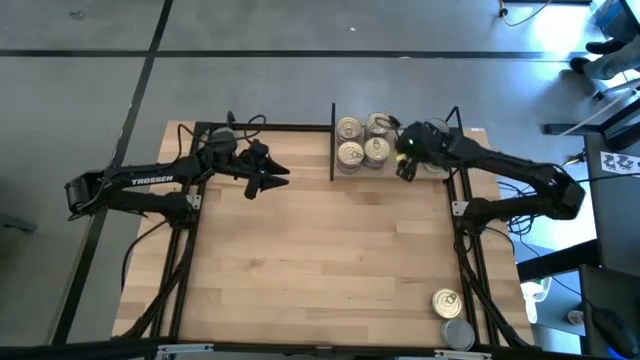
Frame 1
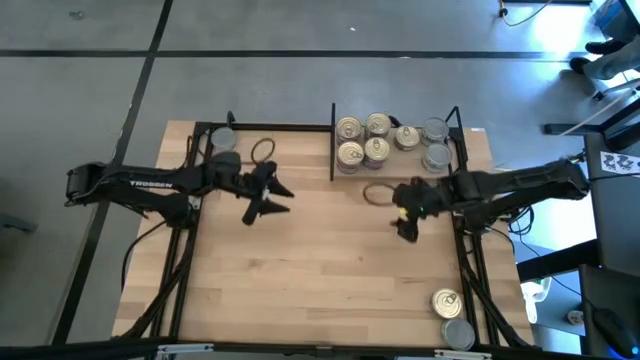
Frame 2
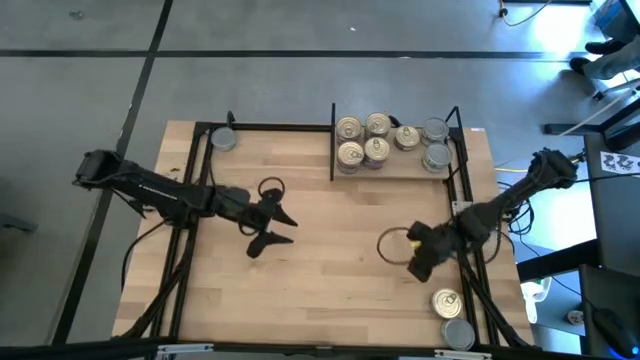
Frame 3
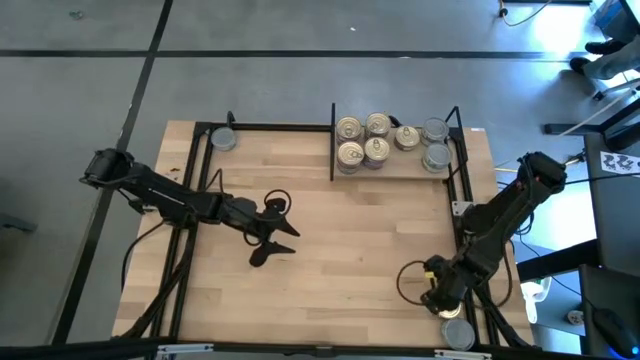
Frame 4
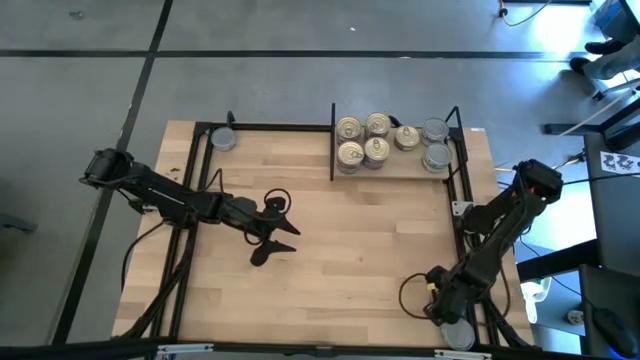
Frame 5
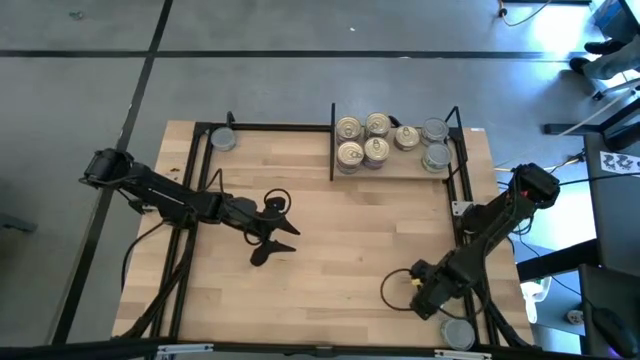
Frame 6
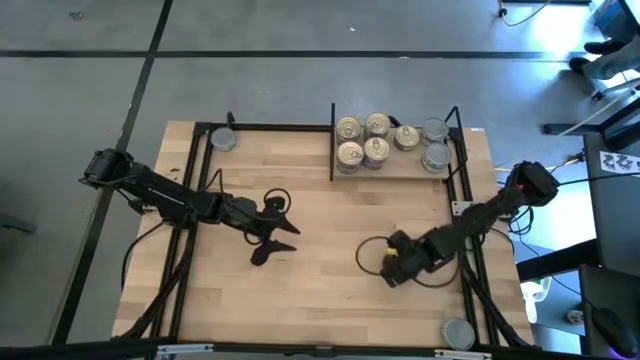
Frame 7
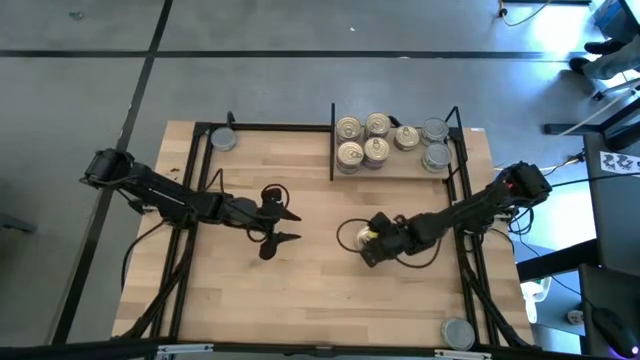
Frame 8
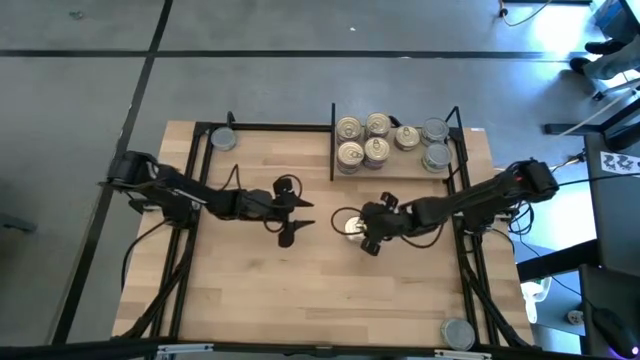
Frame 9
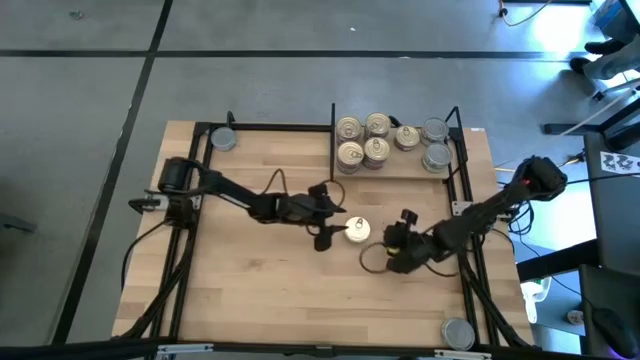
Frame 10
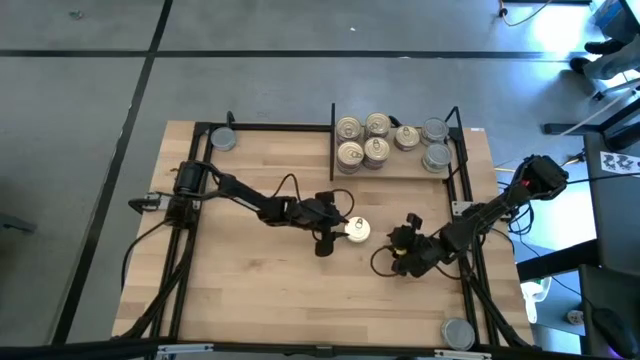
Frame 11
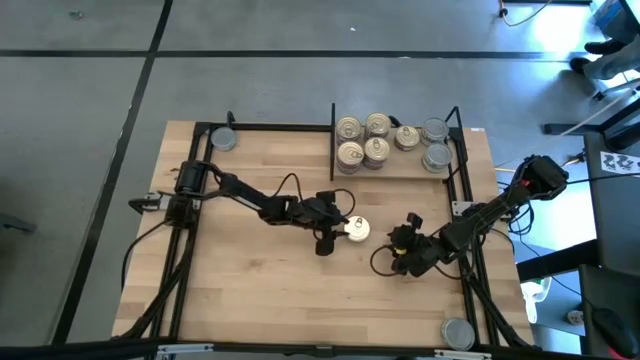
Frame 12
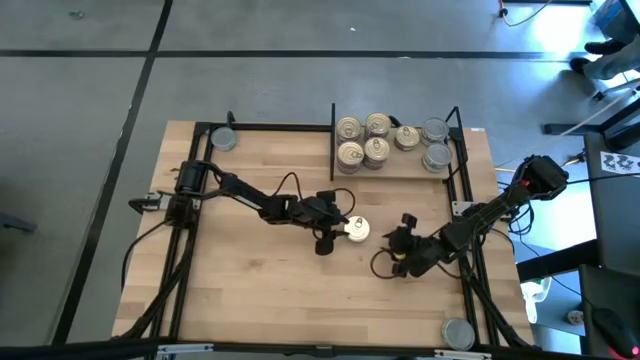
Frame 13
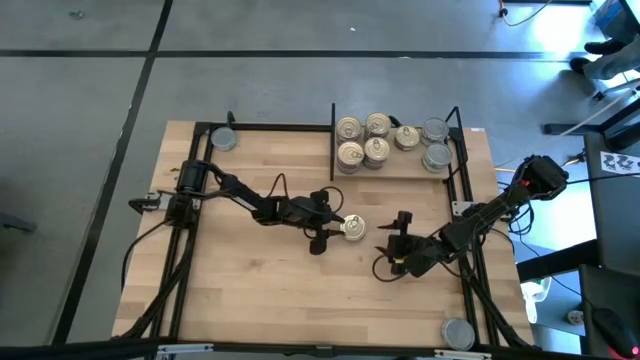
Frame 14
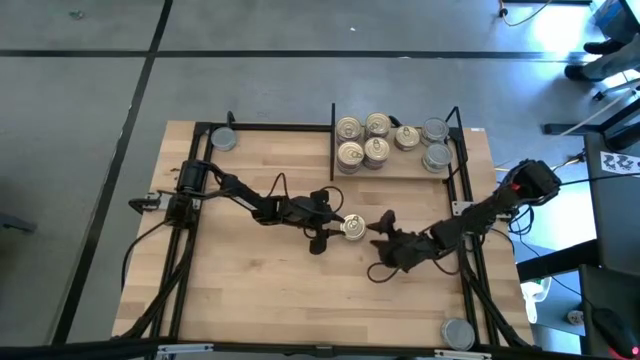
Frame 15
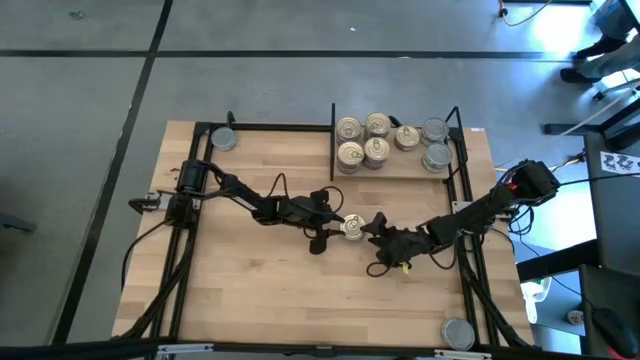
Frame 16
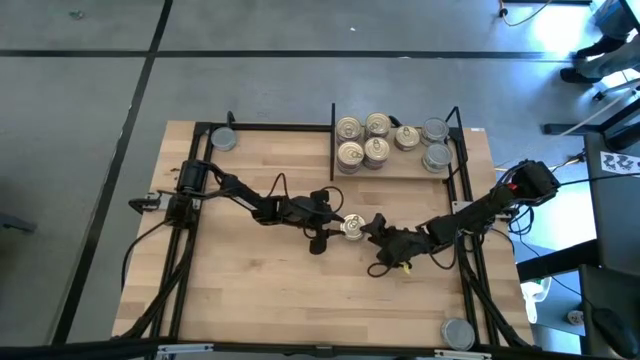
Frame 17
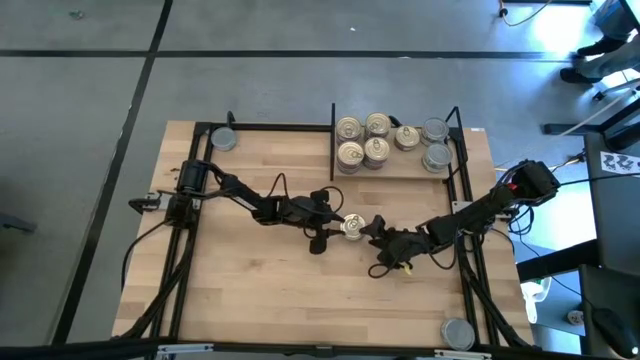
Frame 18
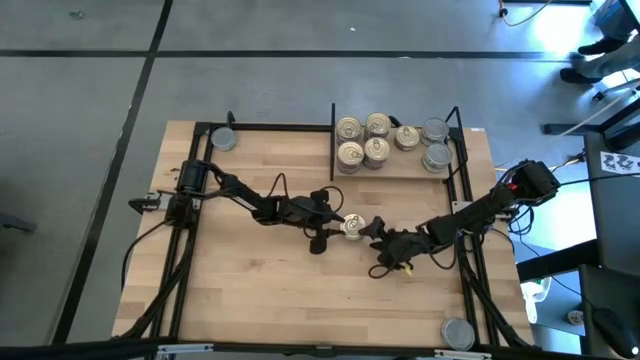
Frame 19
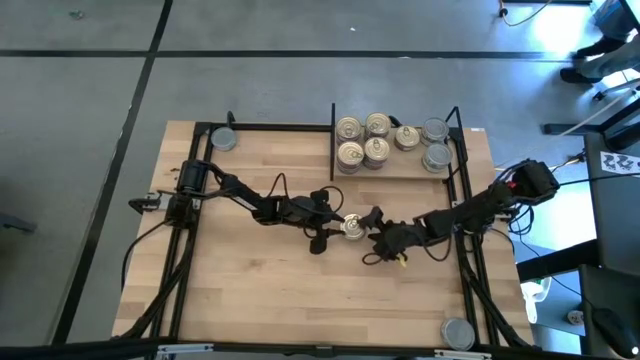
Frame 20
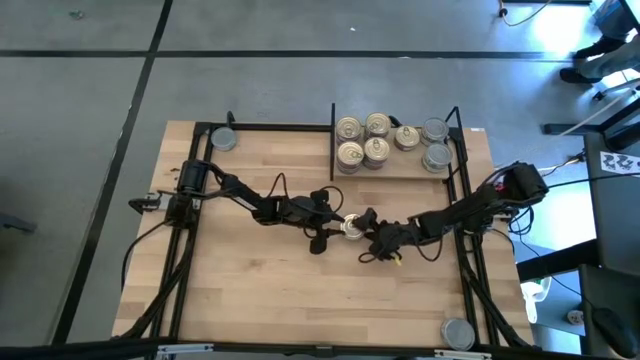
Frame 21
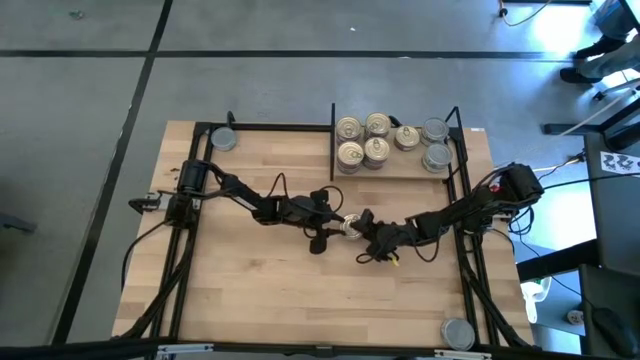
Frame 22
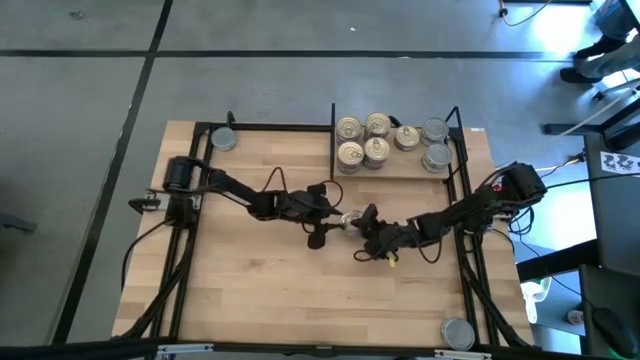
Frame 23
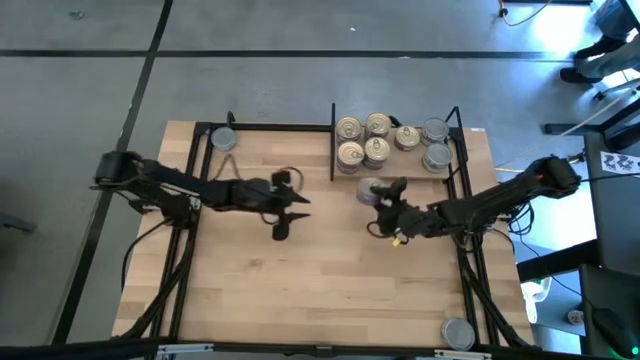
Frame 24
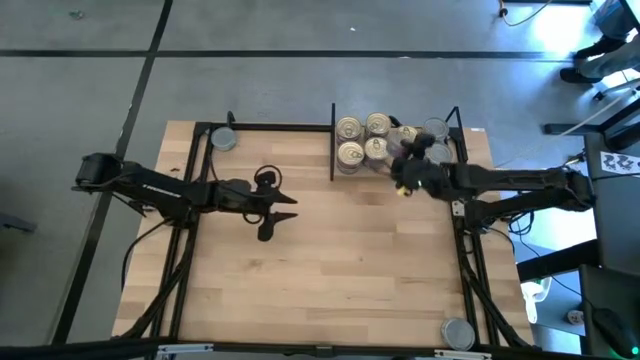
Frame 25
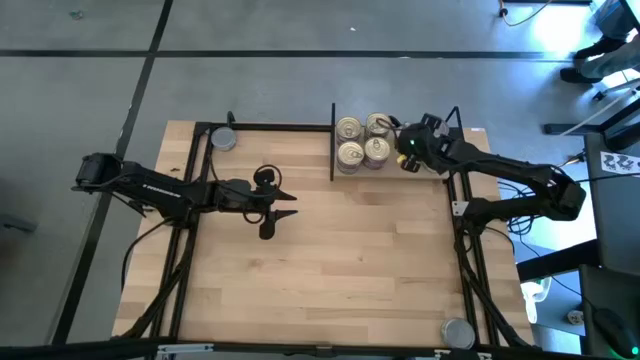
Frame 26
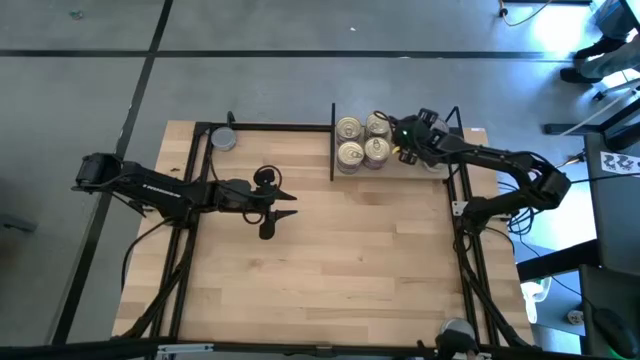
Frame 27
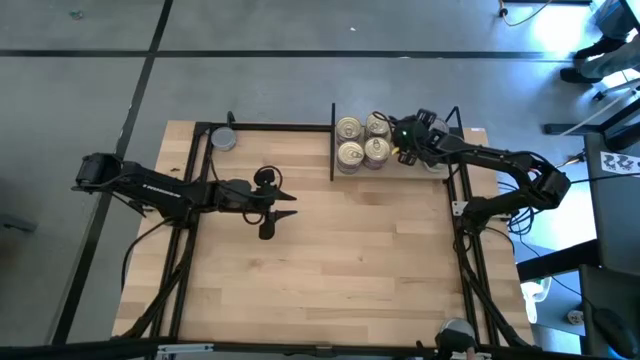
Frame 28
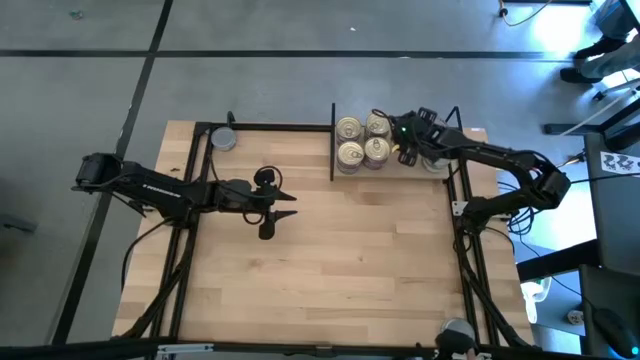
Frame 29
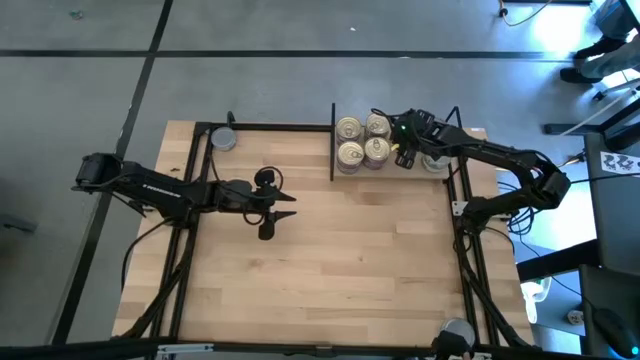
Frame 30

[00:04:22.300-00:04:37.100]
Task: Stack canned seafood by type on shelf
Stack the blue tuna can on top of the blue tuna can

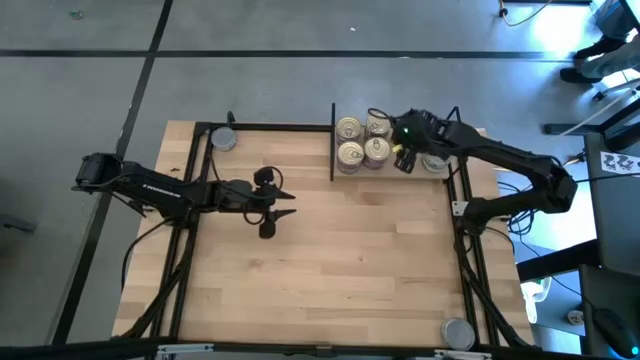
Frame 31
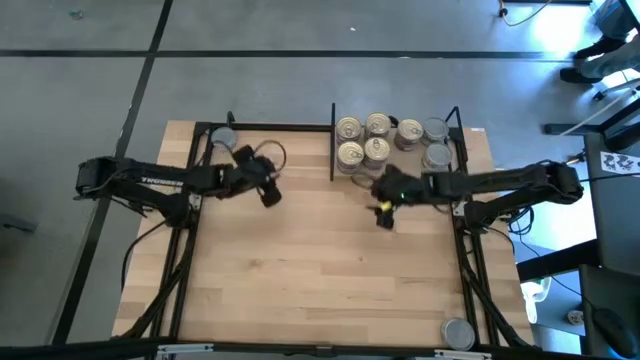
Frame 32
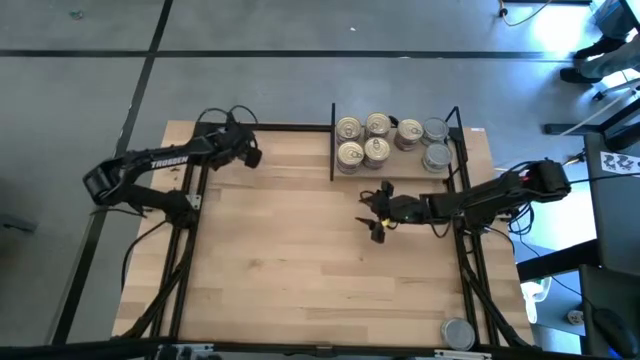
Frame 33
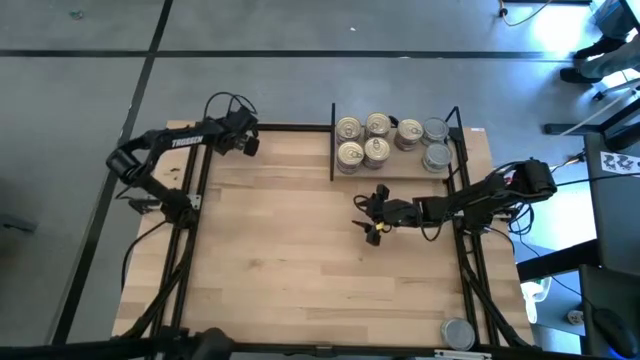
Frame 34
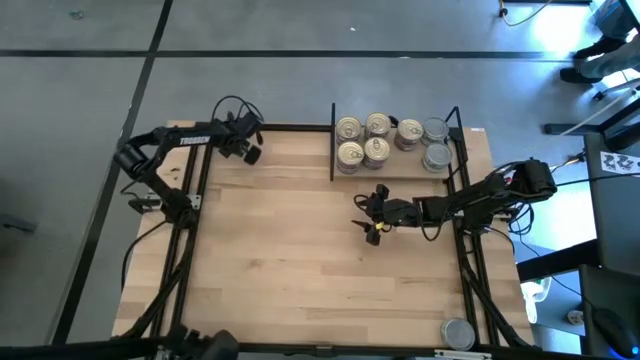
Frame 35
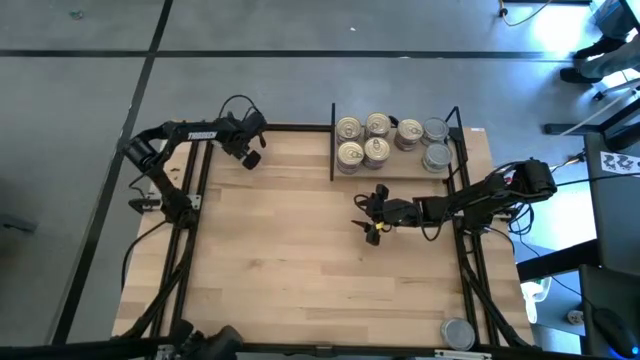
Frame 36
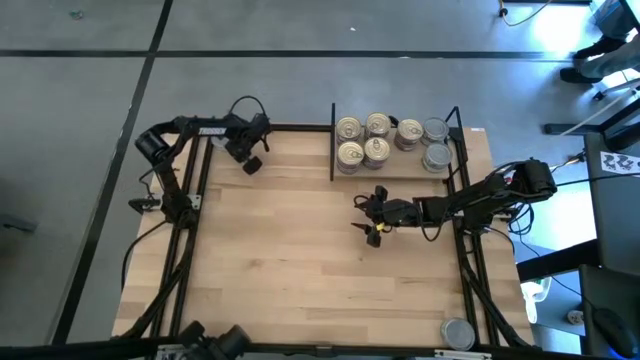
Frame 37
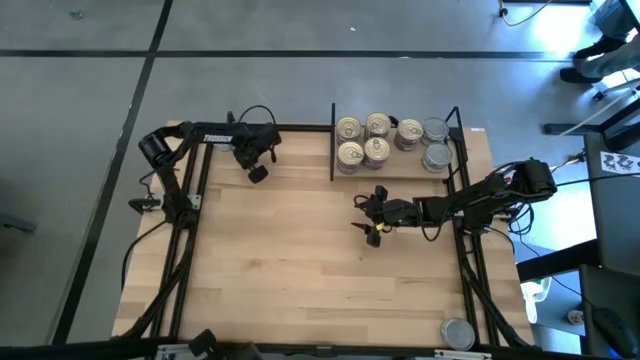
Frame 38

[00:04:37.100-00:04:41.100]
Put the green tuna can on the shelf

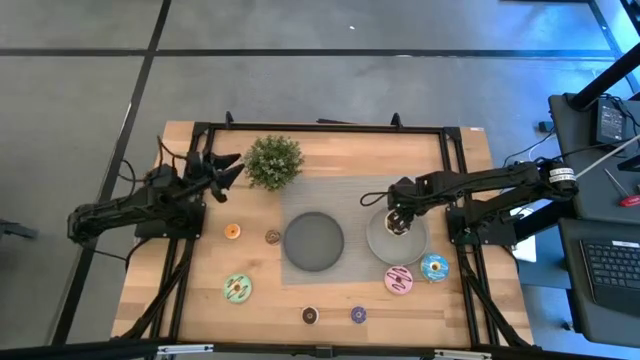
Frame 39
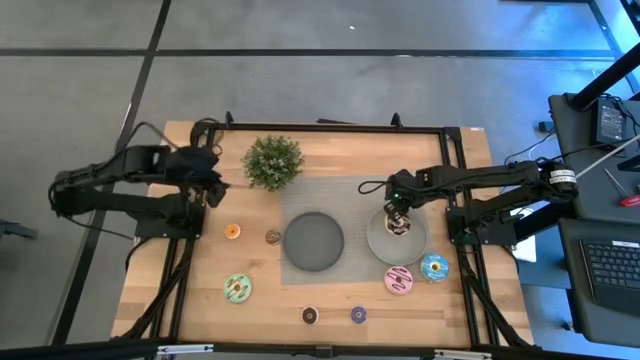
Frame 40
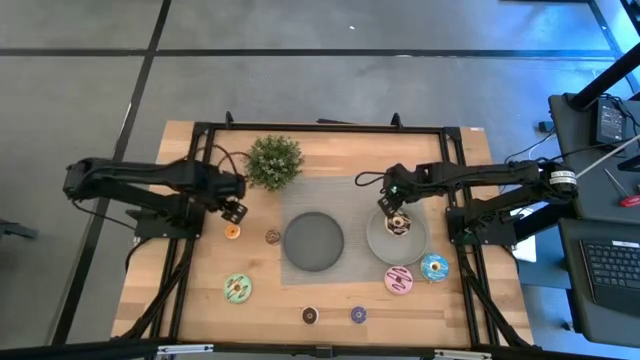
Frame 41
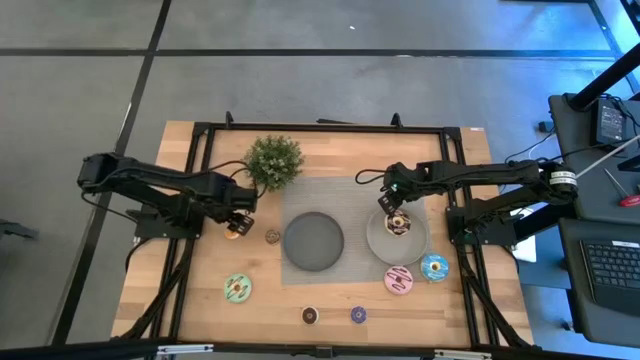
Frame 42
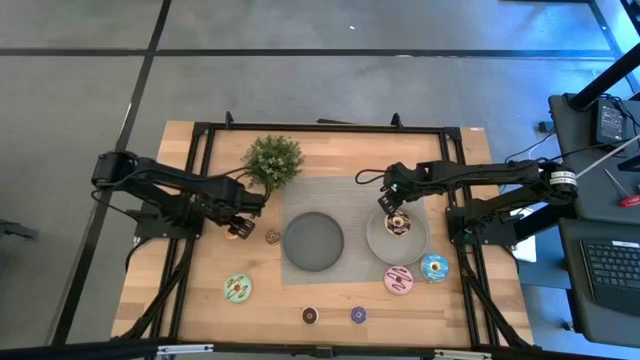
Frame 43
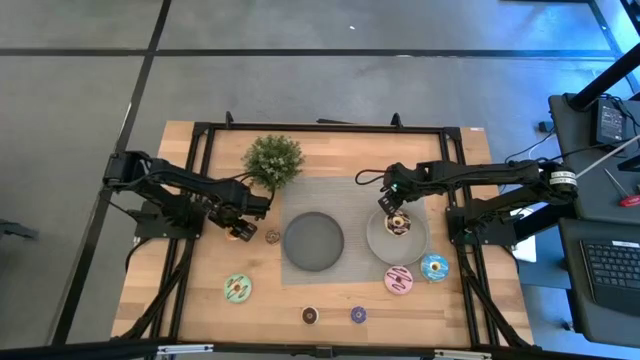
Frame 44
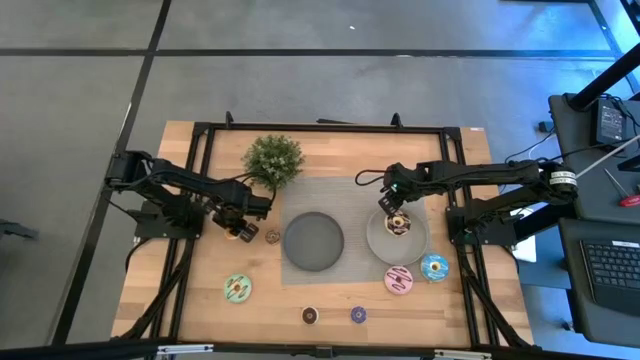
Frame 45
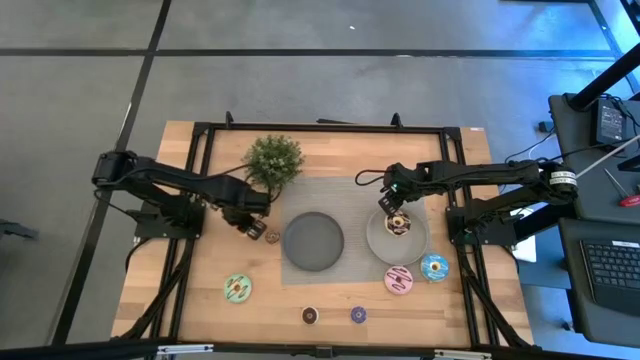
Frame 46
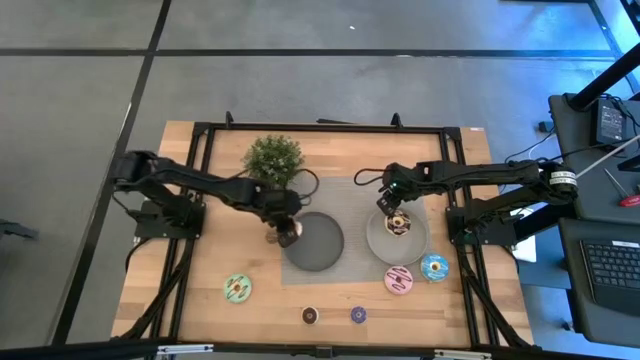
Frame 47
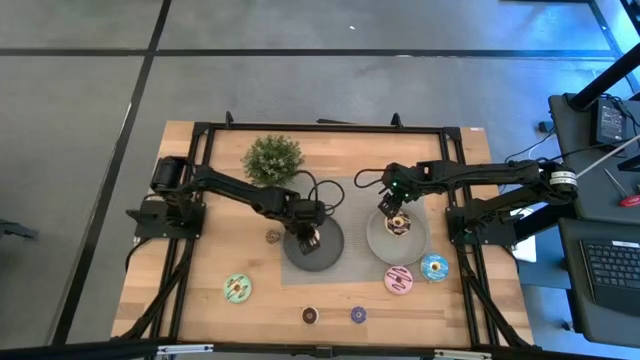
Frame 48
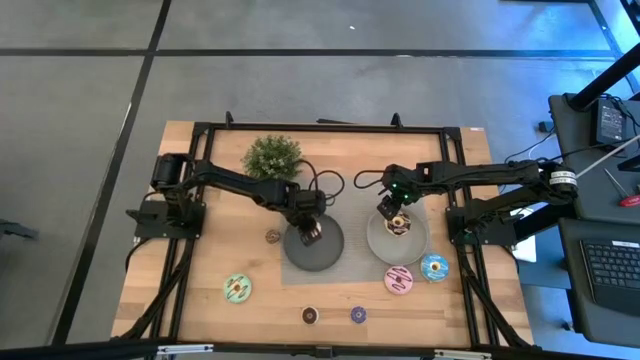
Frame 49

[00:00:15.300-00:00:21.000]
Task: Pick & Place donuts
Put the small yellow donut on the dark gray plate
